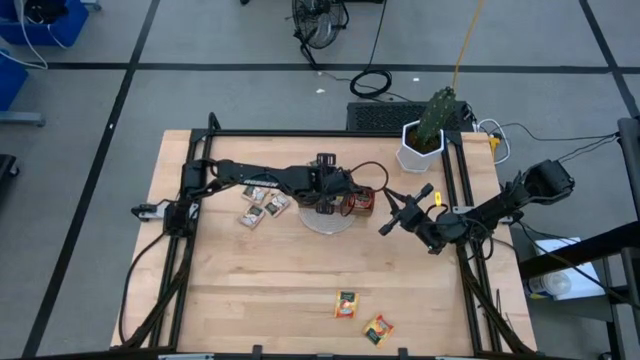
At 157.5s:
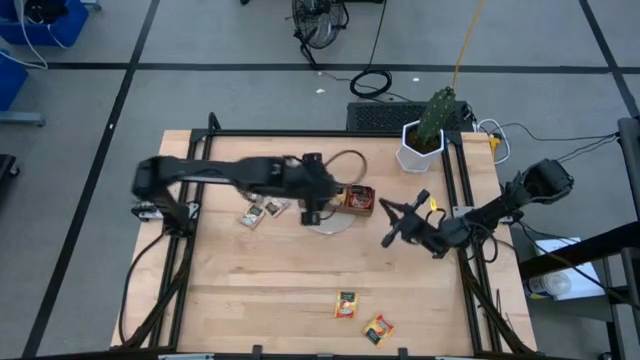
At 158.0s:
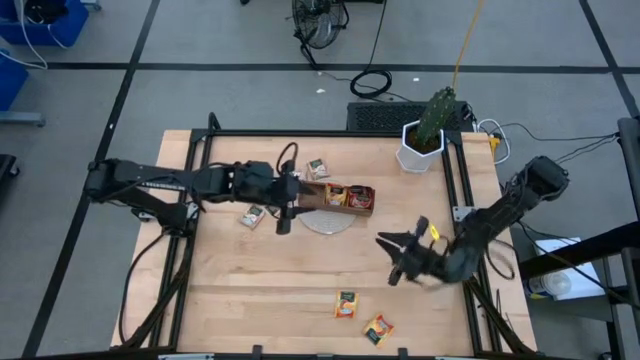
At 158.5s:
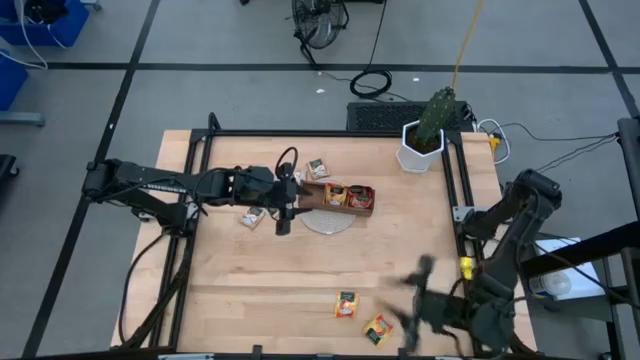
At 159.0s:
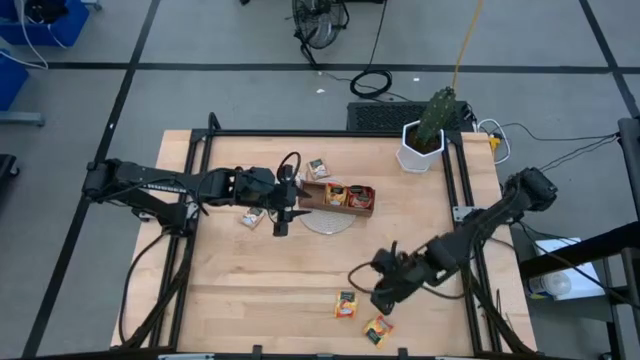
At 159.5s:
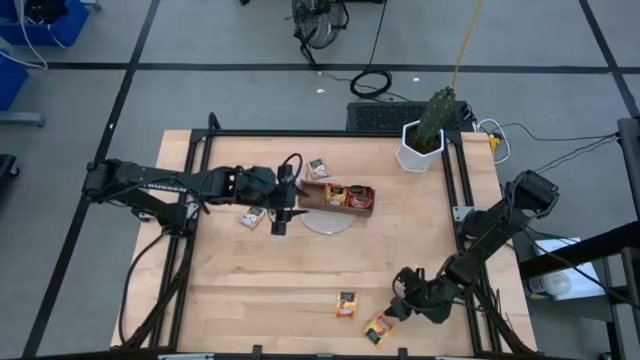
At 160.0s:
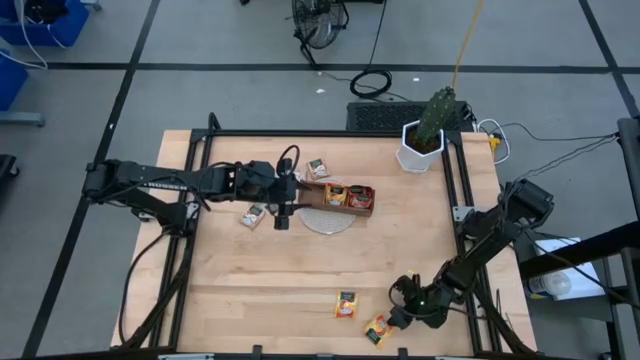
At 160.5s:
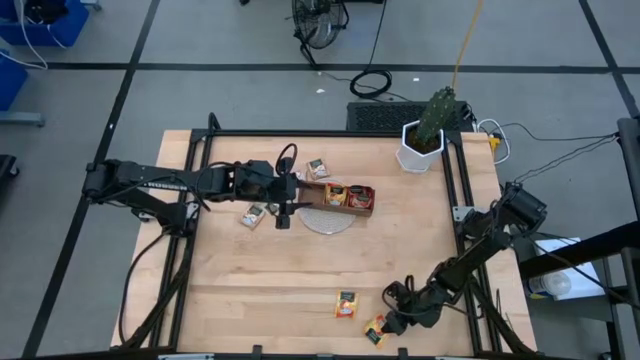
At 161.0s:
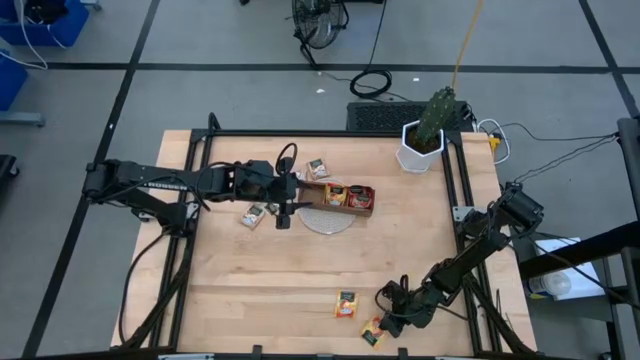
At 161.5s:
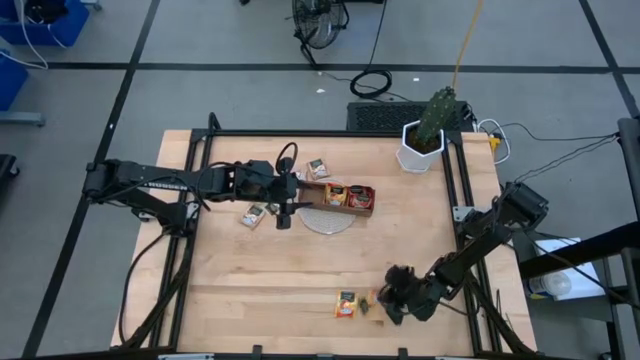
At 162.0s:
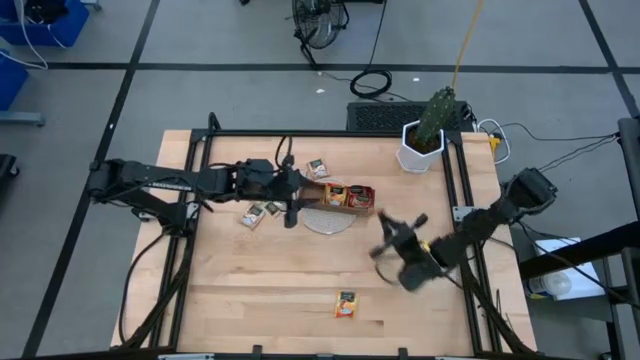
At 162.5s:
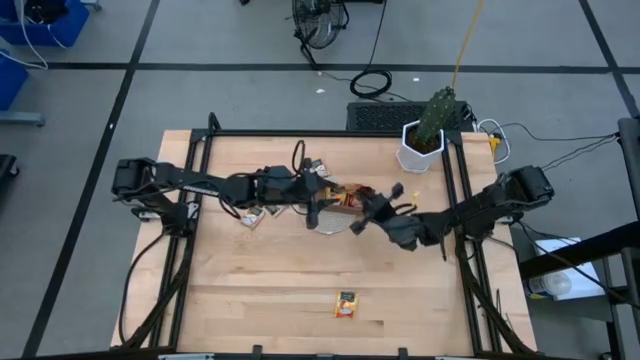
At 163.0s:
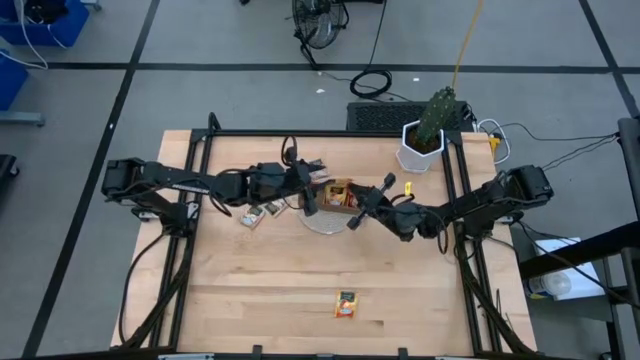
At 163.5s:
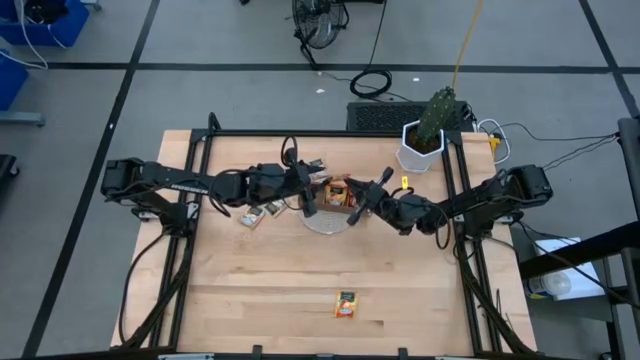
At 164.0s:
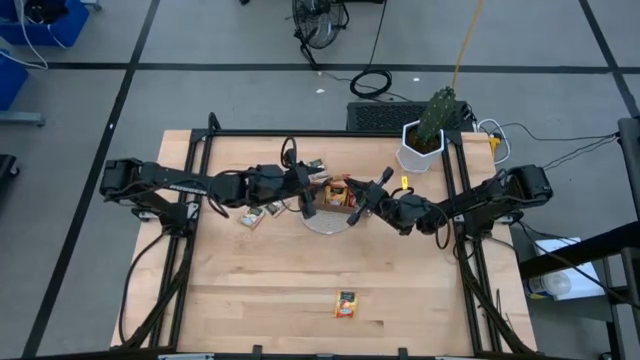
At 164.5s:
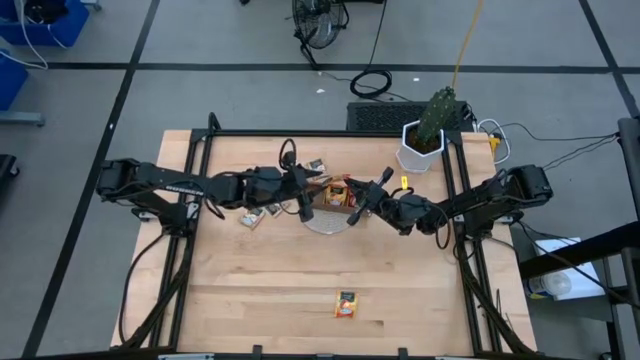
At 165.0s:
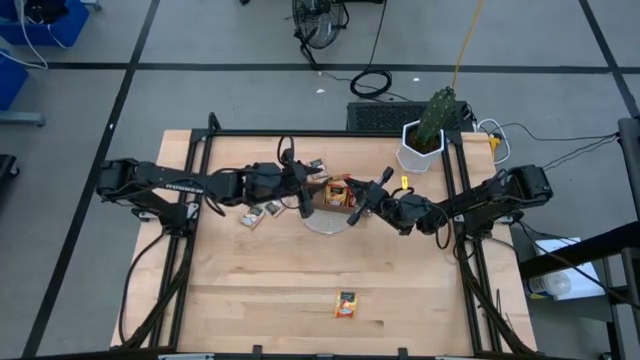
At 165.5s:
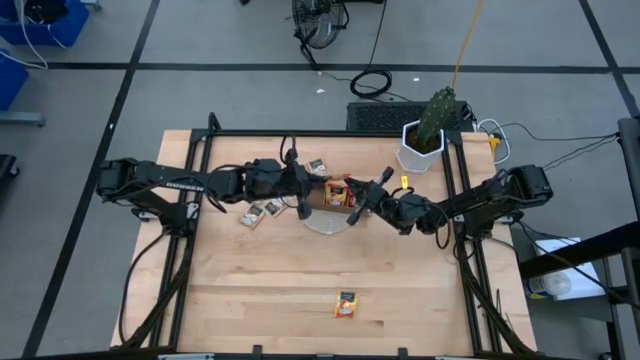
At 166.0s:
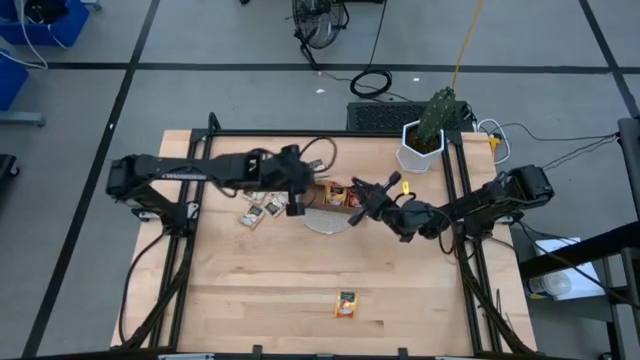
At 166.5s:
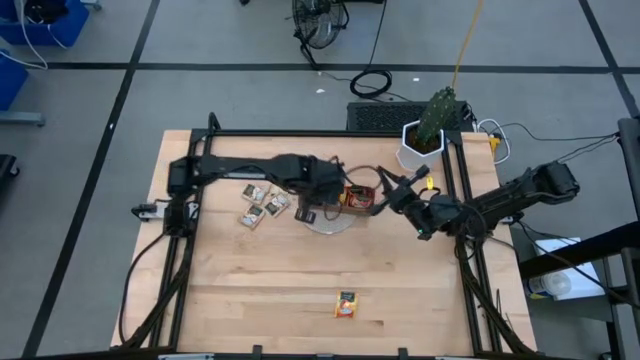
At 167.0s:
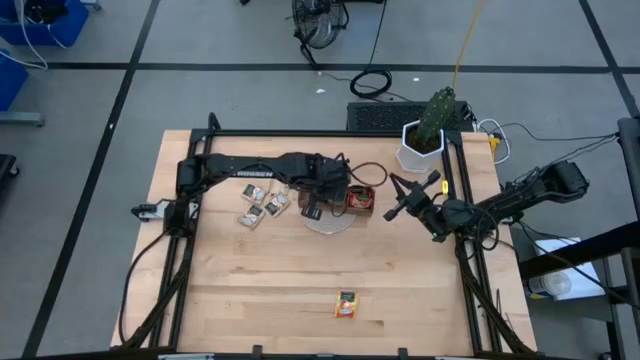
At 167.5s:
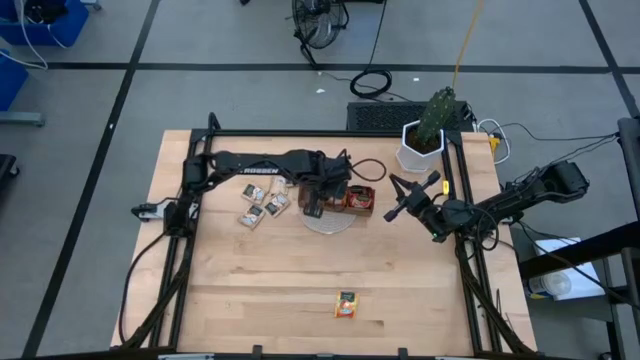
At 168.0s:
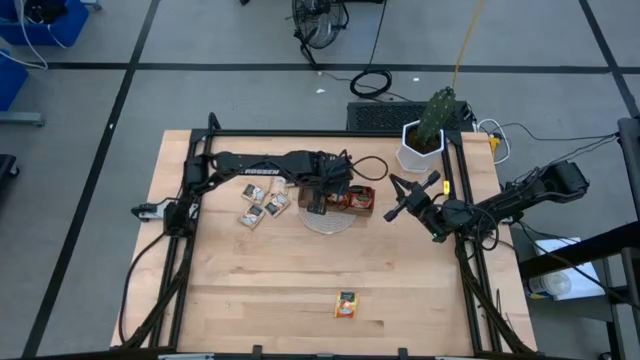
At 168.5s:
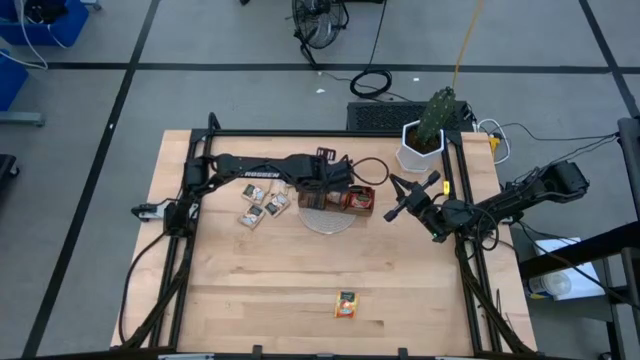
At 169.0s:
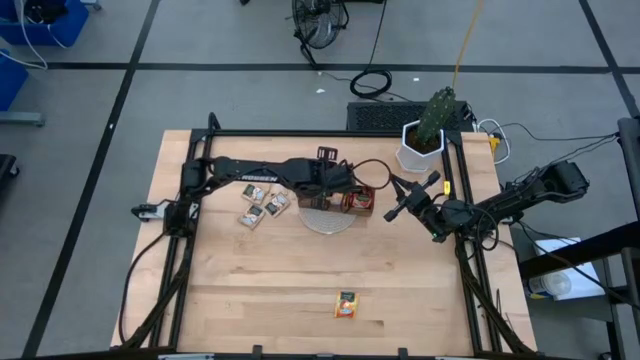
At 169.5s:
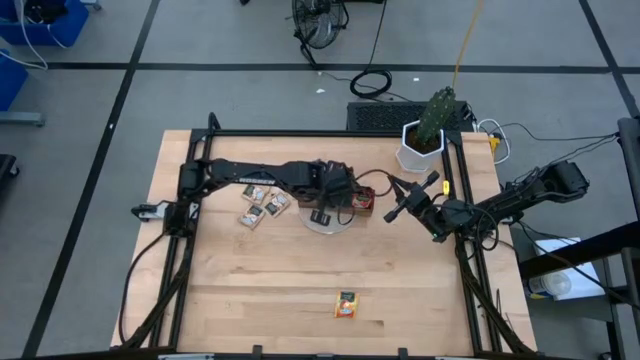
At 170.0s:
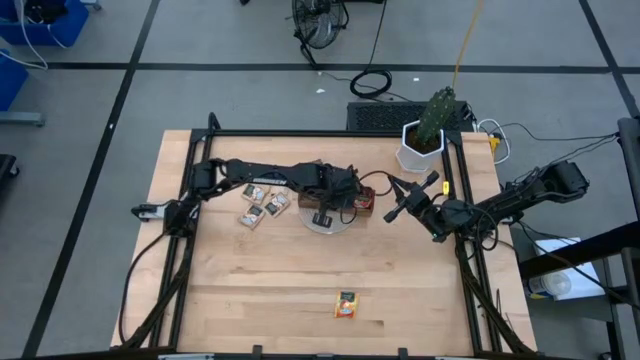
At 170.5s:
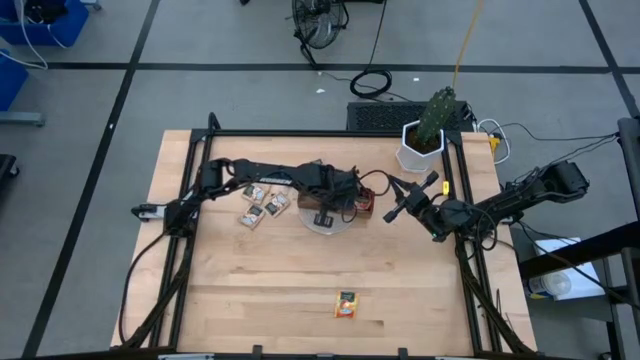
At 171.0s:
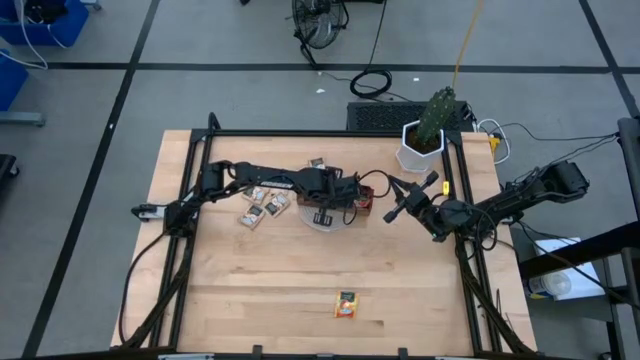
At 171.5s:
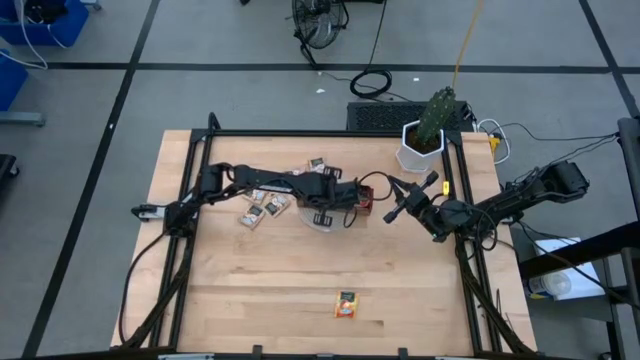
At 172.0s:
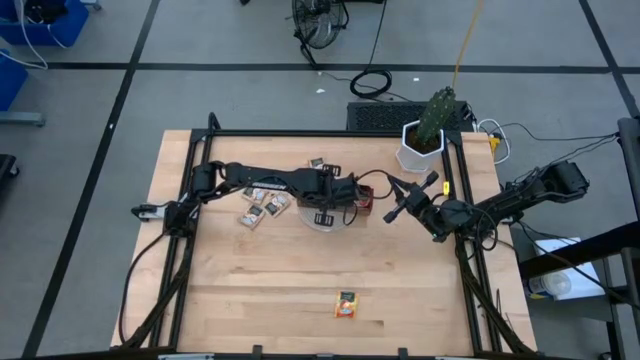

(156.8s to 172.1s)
Task: Pick & Place Tea
Put the orange tea bag into the middle section of the wood organizer

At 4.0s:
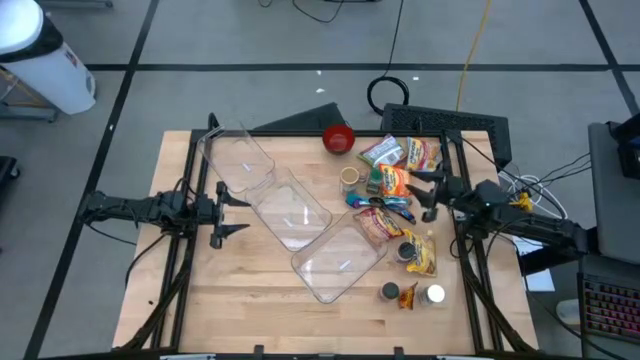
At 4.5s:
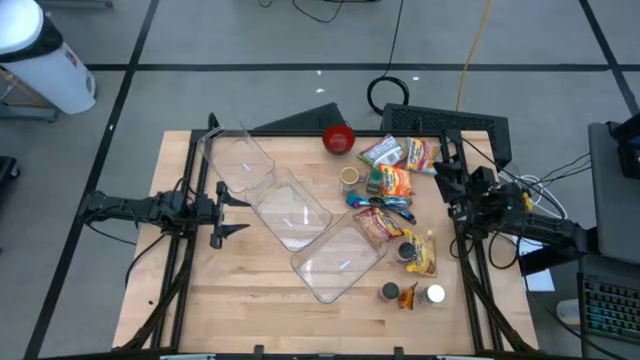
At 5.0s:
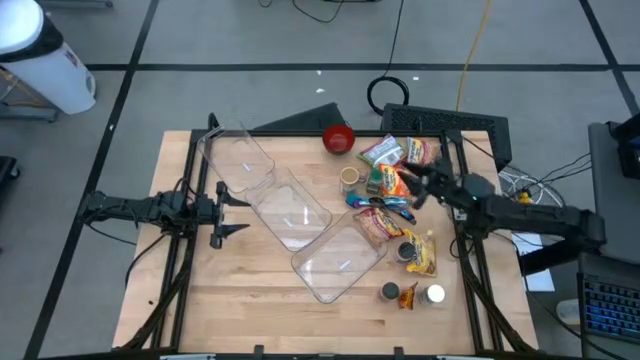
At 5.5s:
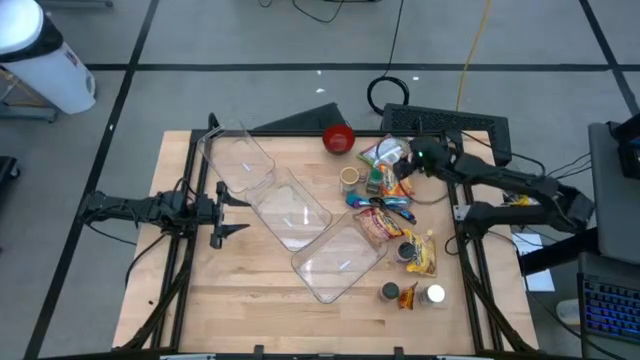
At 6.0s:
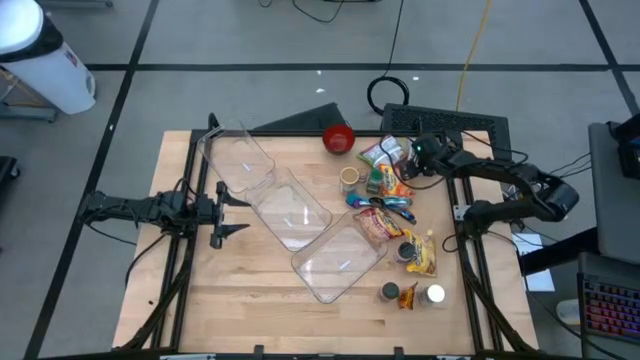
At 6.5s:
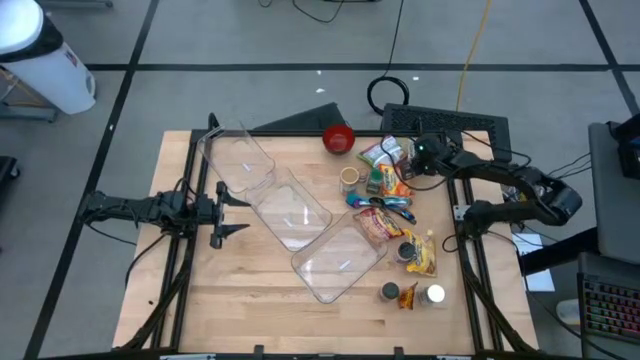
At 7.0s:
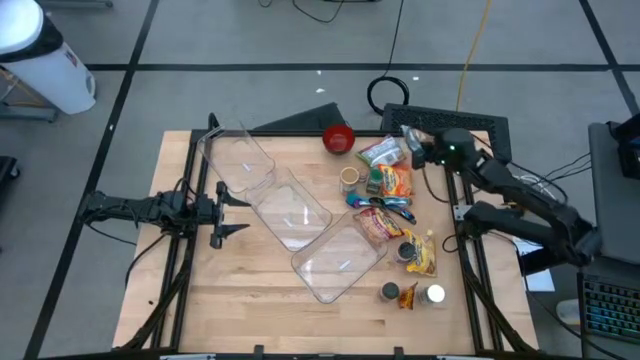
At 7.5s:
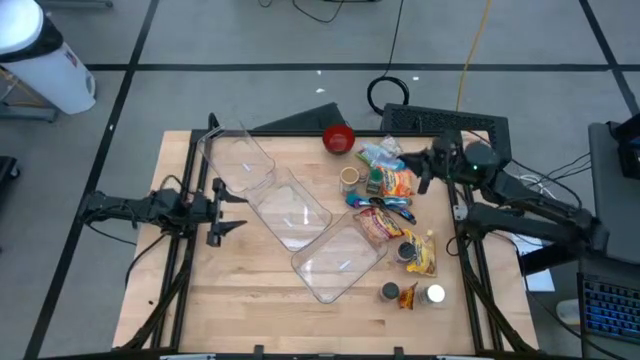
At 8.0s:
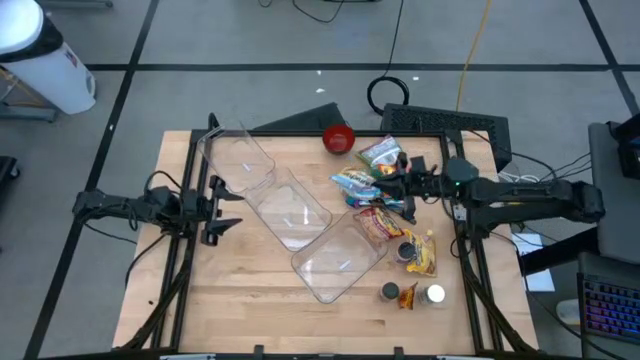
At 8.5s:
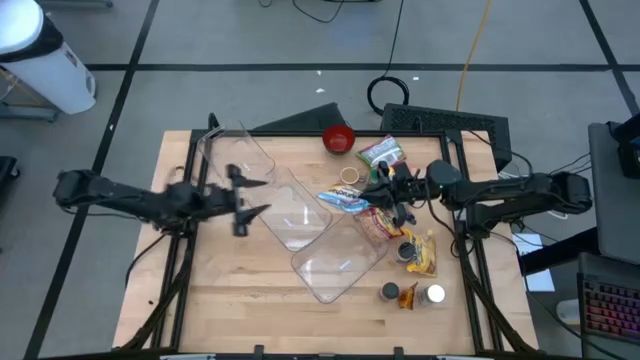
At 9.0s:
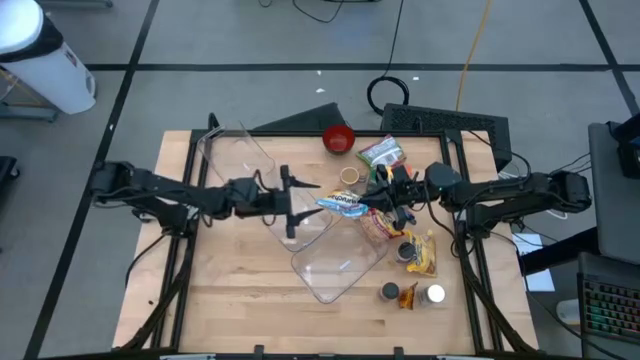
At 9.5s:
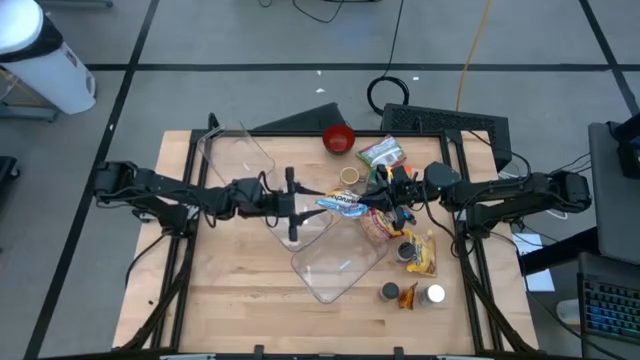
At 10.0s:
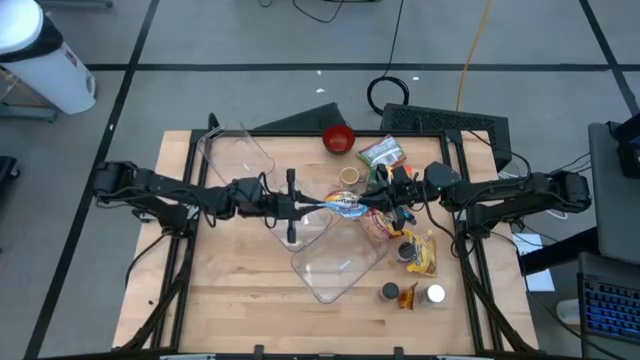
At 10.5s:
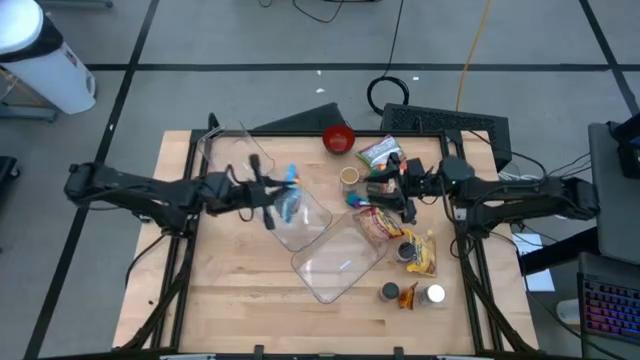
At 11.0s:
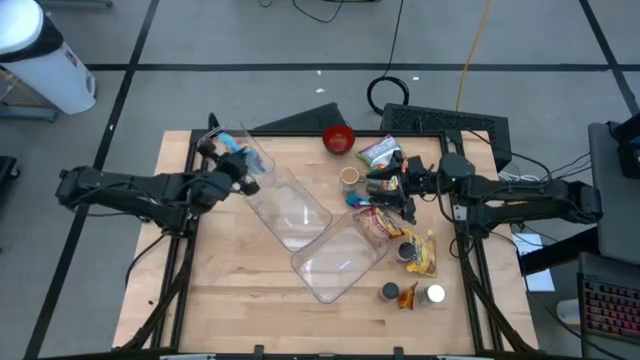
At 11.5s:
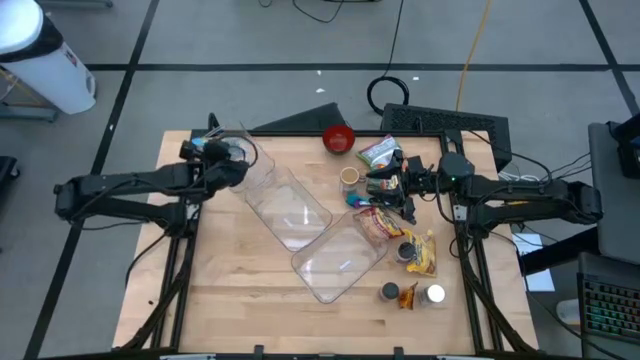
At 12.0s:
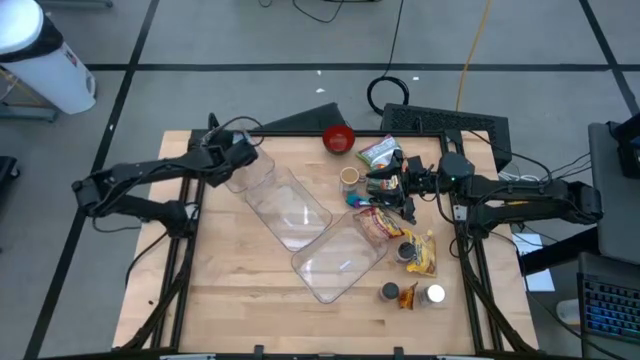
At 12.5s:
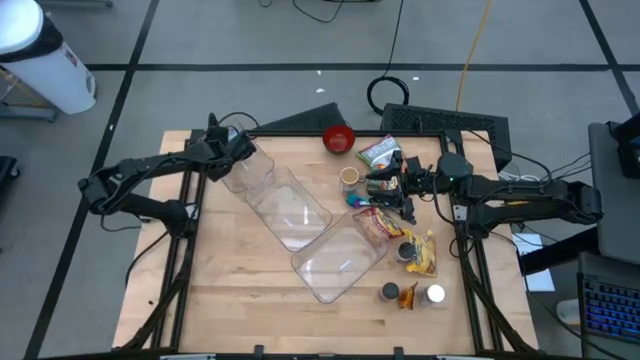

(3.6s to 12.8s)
Task: Pick & Place Food Item
Put the blue noodle pack into the top transparent bin
